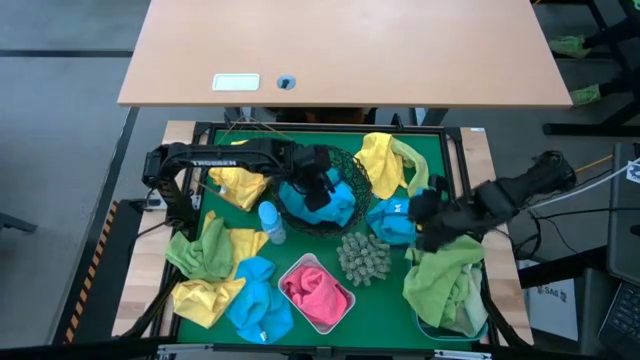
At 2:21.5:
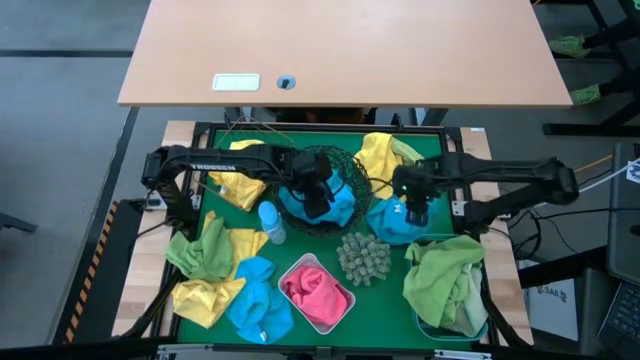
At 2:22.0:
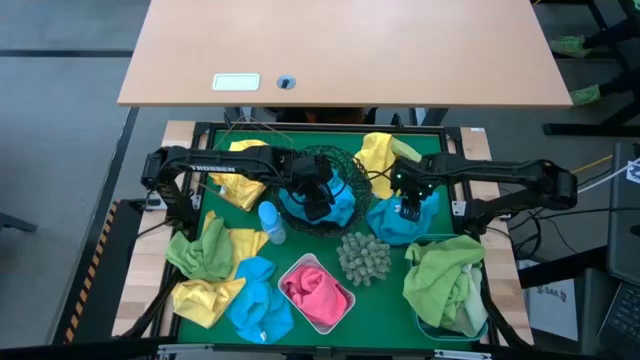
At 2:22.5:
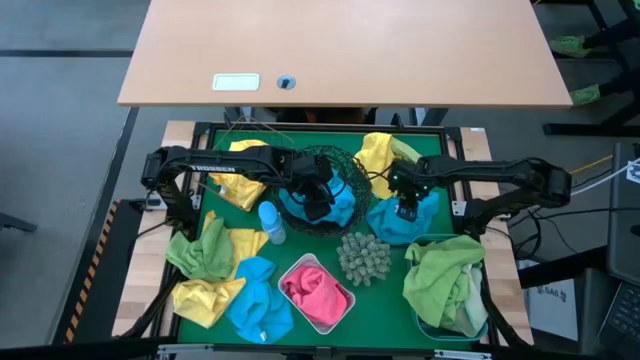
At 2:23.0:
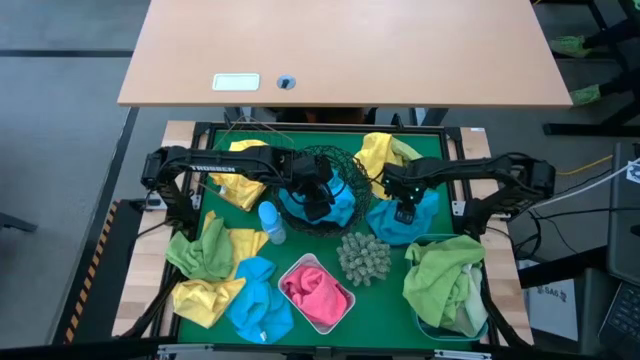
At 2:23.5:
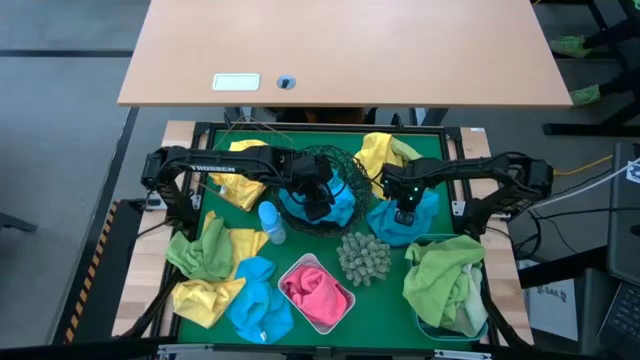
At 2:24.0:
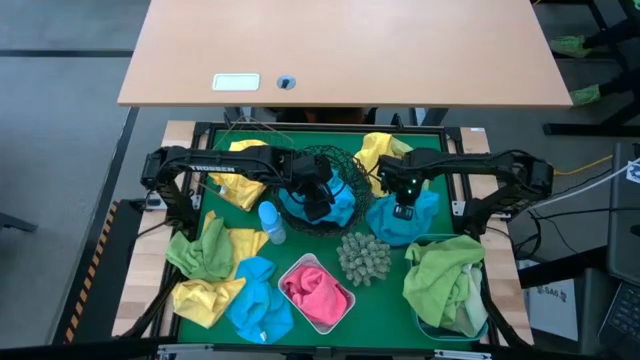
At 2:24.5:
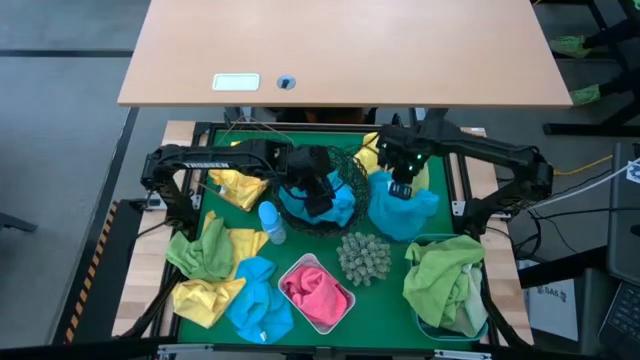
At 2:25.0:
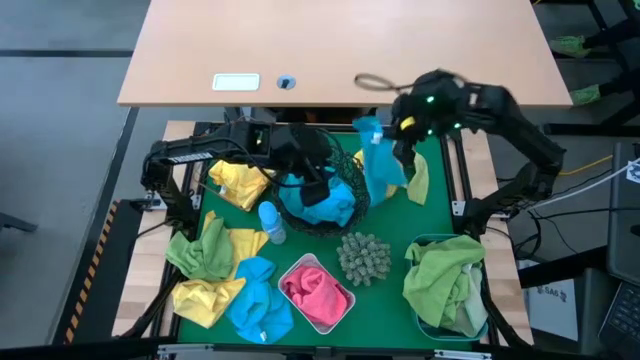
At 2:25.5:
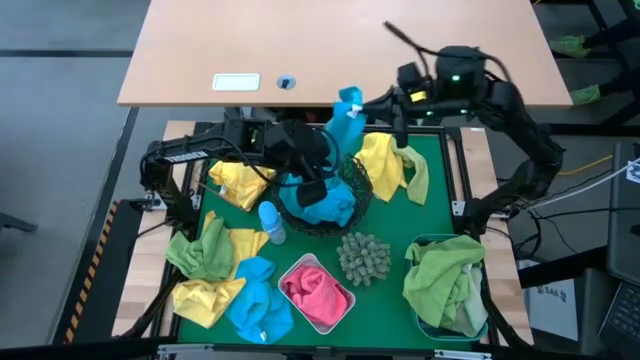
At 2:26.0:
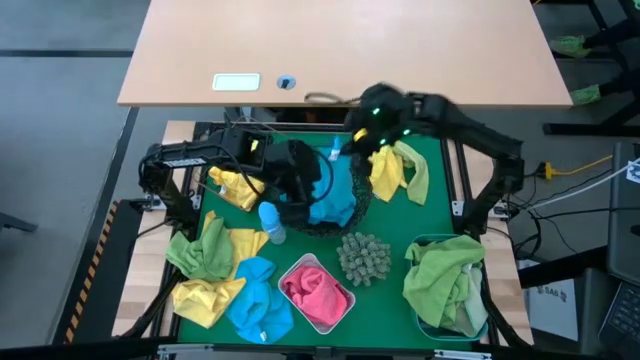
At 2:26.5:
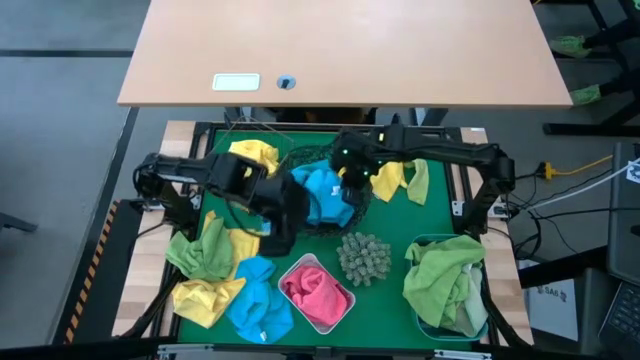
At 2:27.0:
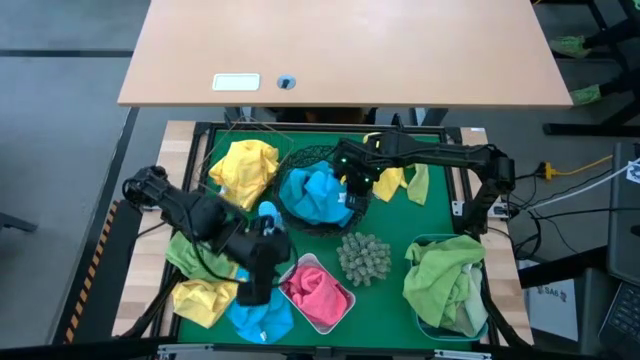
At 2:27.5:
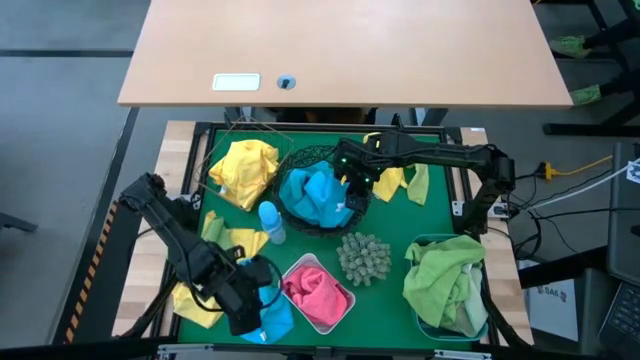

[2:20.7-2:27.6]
Task: Sort microfiber towel by color & place in baskets
Put the blue microfiber cloth into the circular wire basket

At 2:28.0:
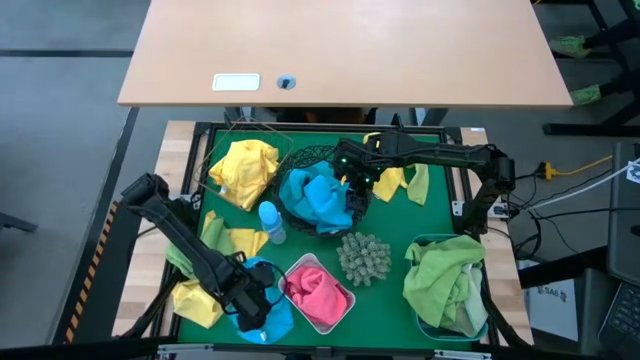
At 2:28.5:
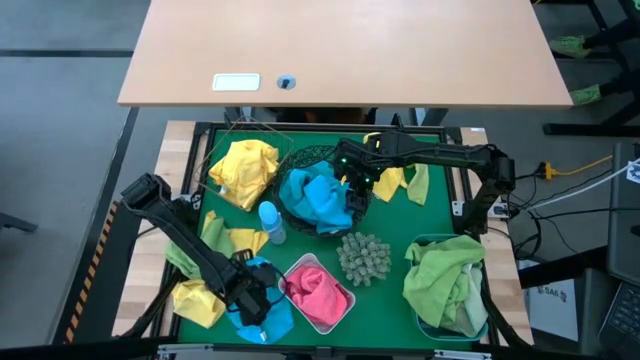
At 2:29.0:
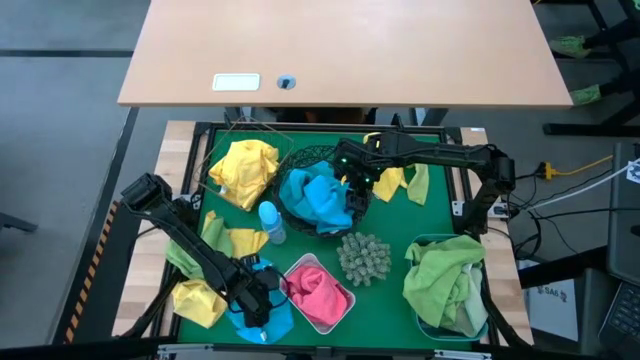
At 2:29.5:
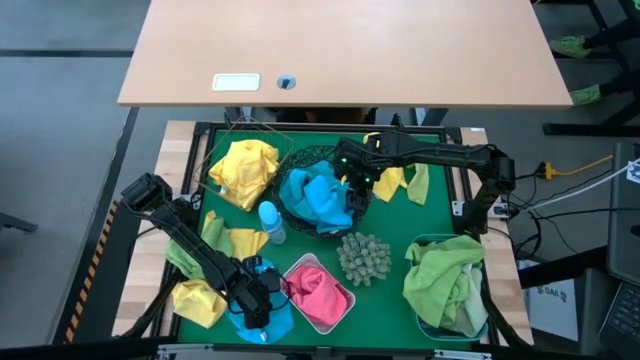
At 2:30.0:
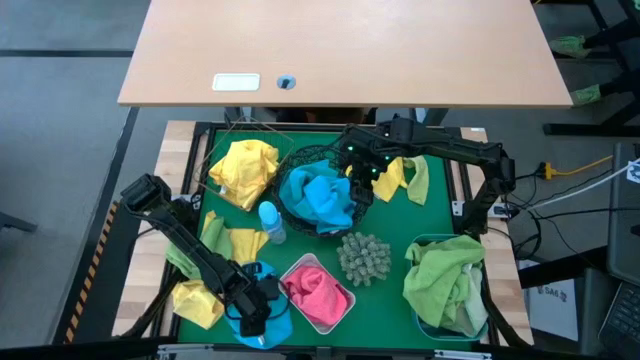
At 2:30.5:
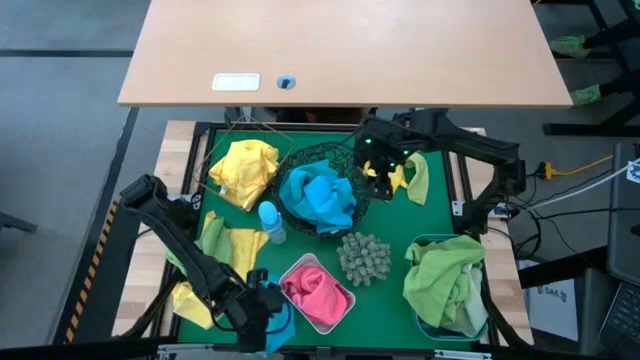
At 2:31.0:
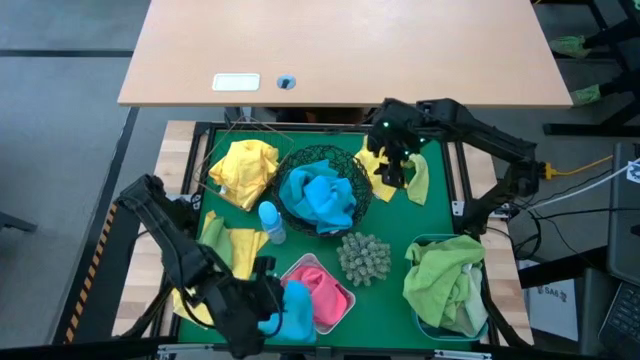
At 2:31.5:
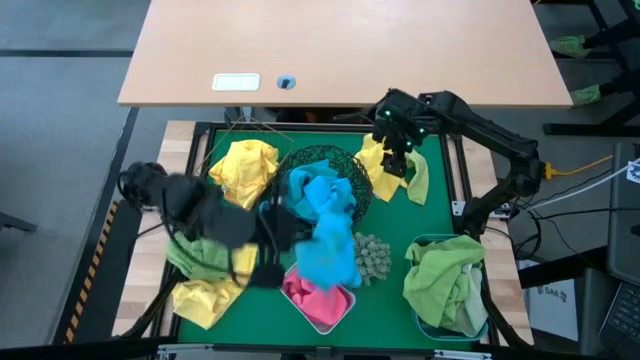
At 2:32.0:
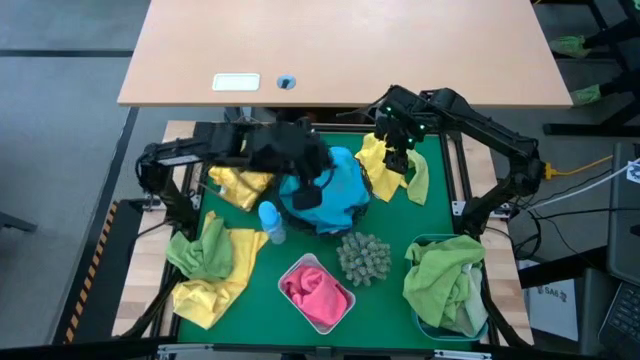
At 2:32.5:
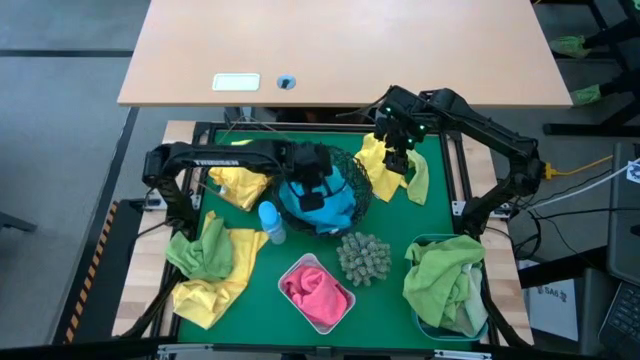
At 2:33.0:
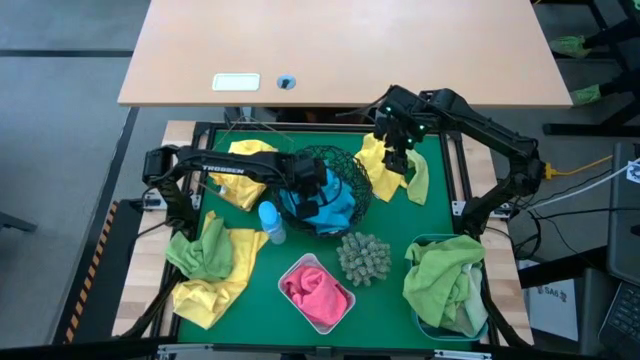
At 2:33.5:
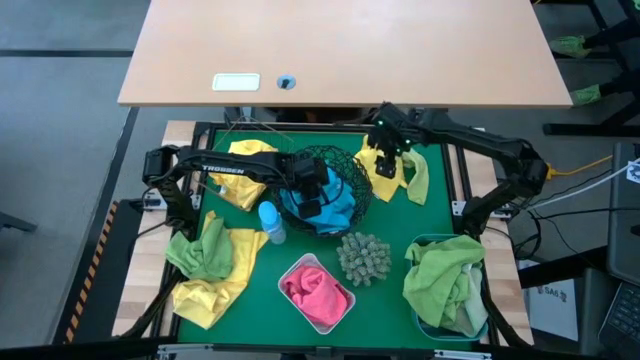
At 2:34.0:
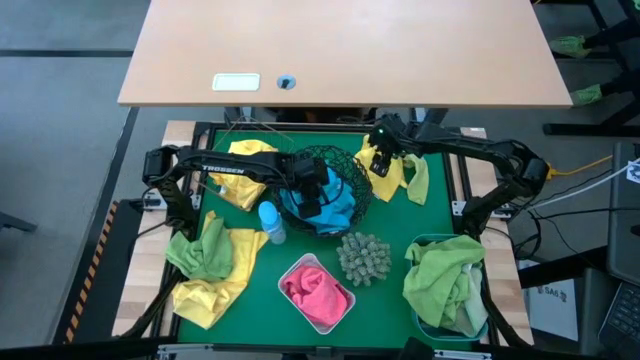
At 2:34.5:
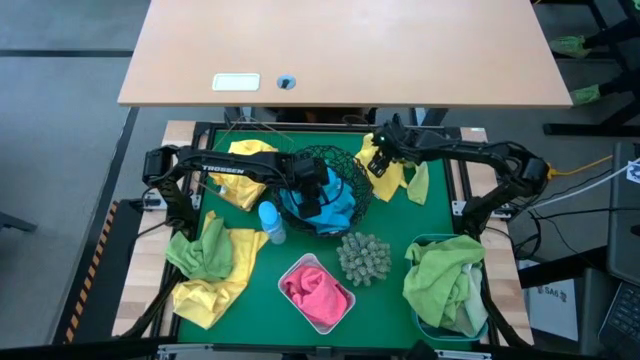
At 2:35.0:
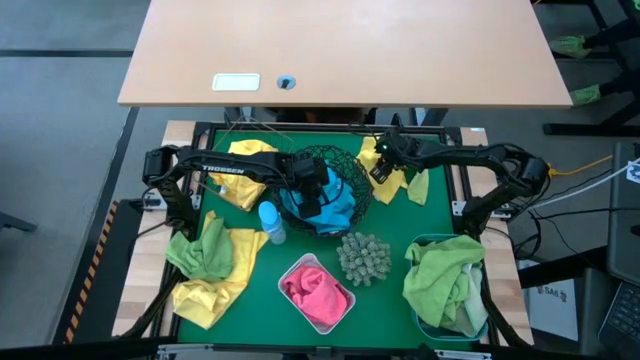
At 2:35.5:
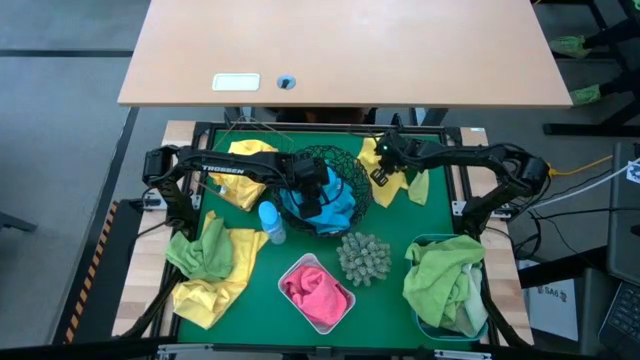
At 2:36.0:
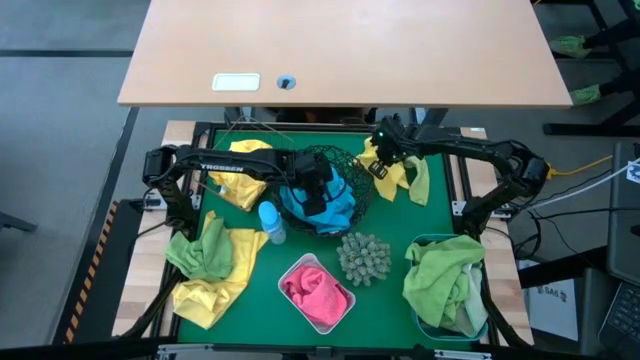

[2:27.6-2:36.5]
Put the blue microfiber cloth into the circular wire basket

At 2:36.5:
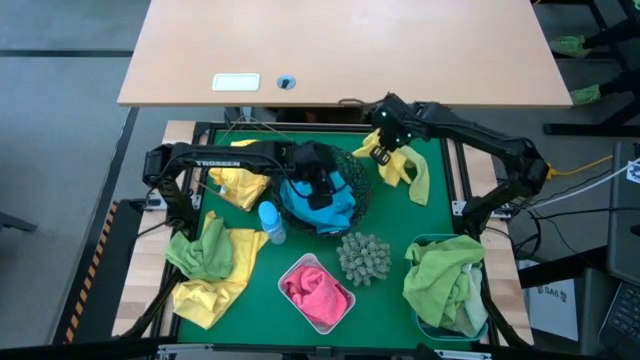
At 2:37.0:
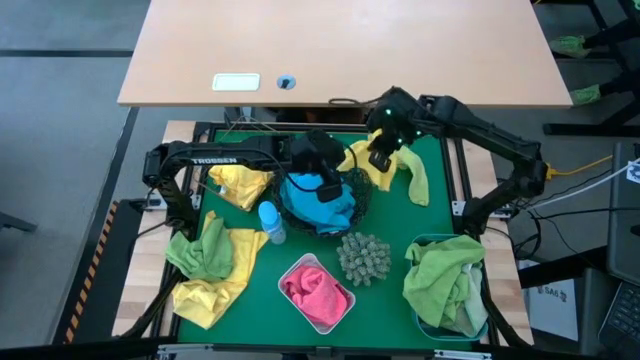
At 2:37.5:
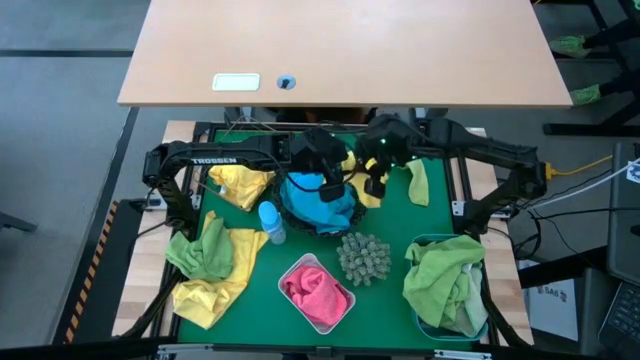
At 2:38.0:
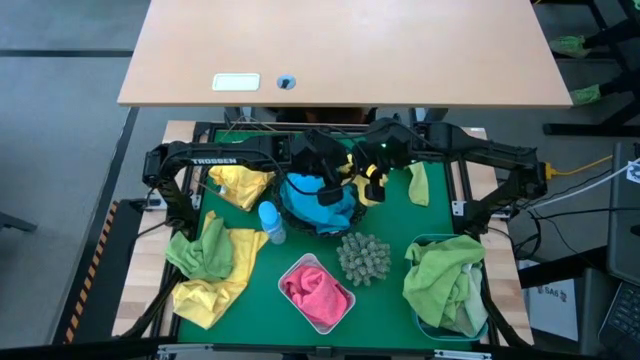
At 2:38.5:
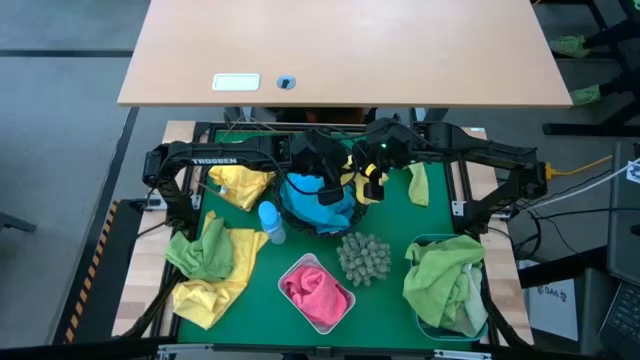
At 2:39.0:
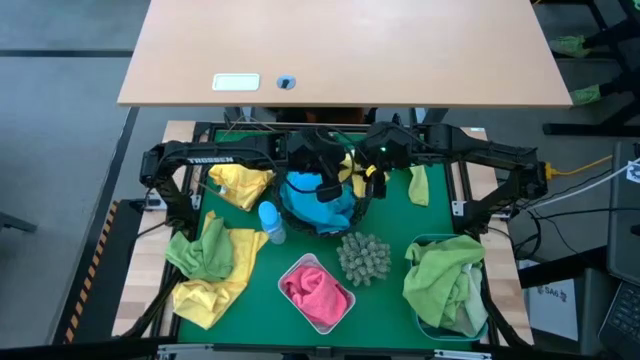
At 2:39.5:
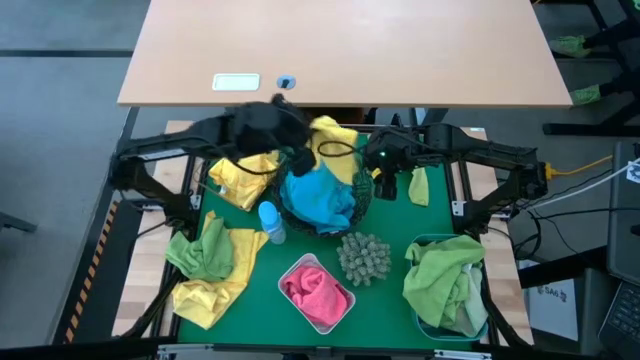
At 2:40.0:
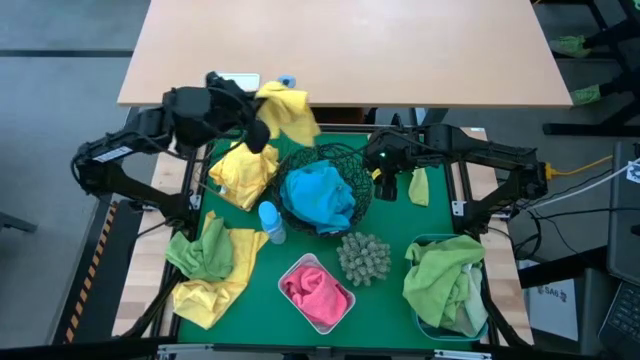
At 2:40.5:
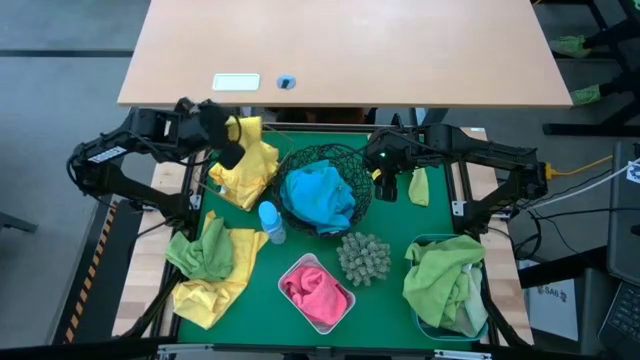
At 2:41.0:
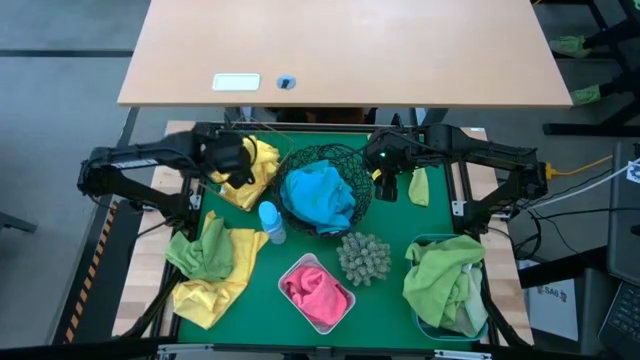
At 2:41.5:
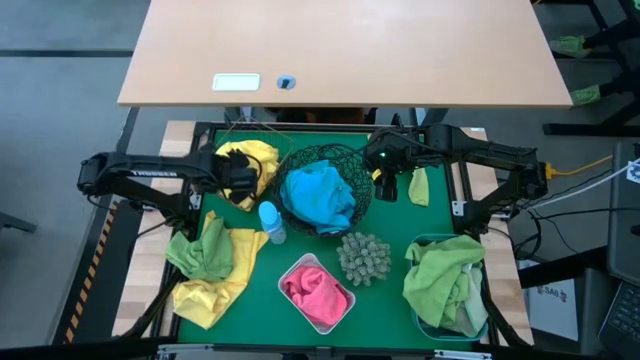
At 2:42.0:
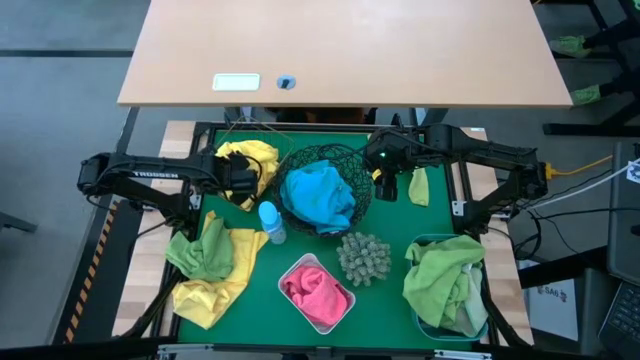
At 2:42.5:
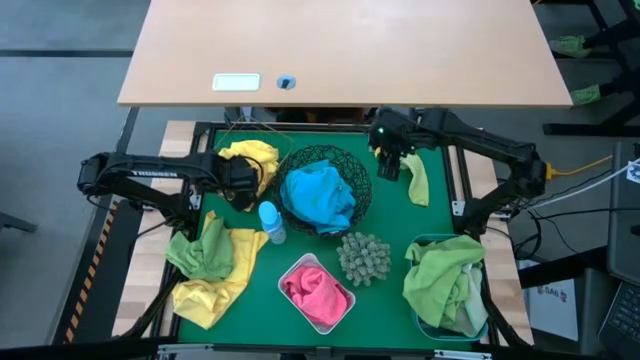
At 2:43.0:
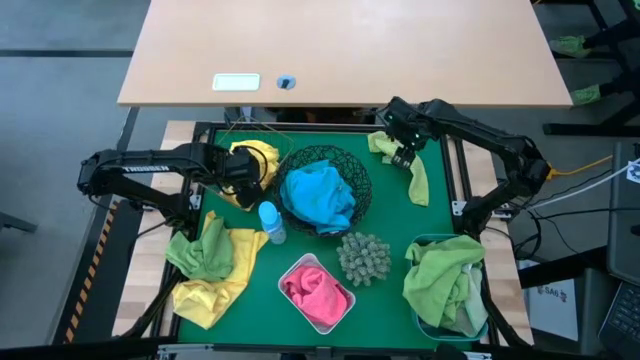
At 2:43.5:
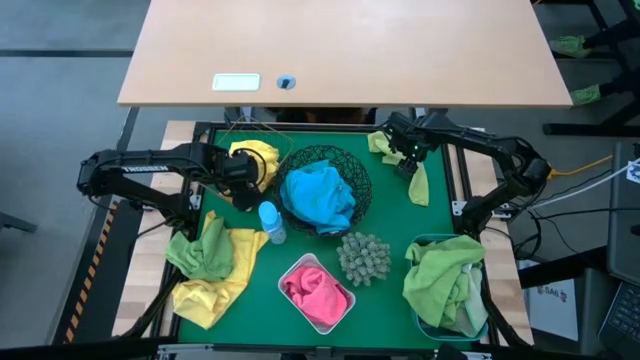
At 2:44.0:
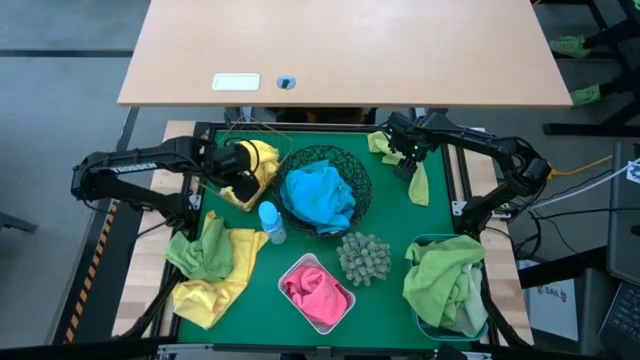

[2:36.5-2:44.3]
Put the yellow microfiber cloth into the rectangular wire basket
